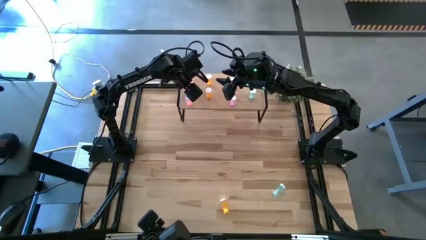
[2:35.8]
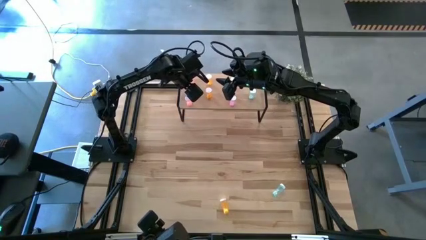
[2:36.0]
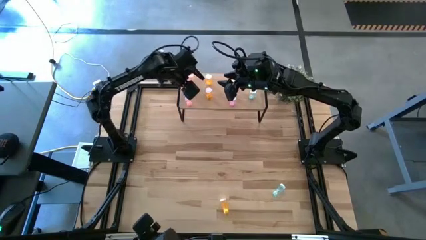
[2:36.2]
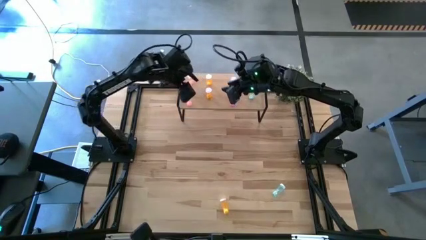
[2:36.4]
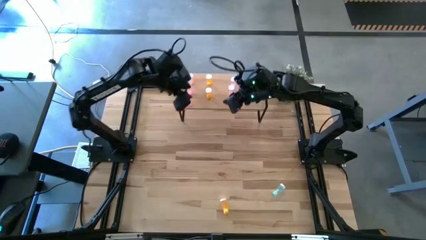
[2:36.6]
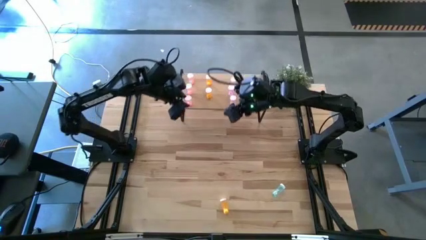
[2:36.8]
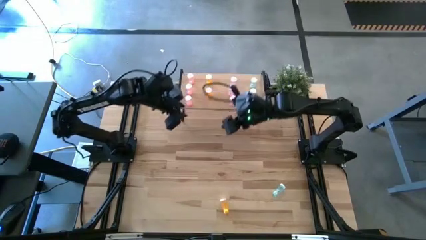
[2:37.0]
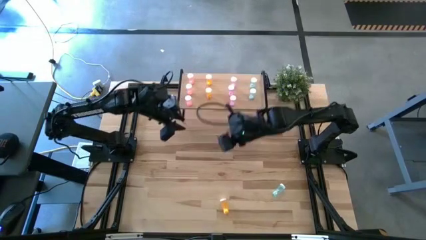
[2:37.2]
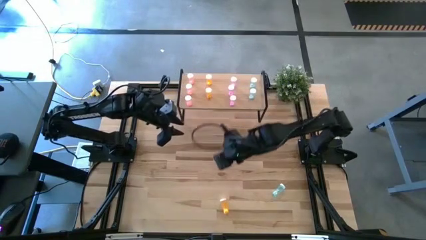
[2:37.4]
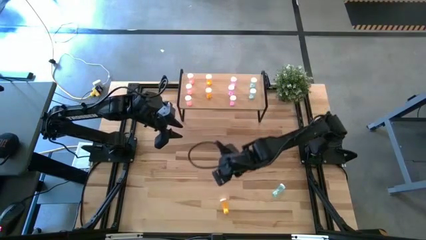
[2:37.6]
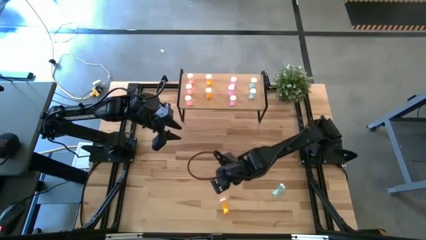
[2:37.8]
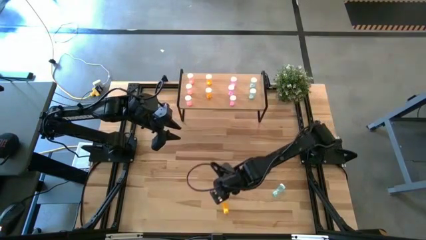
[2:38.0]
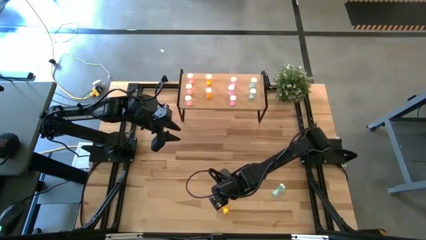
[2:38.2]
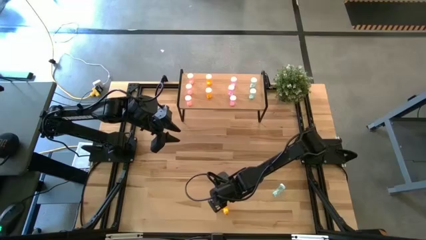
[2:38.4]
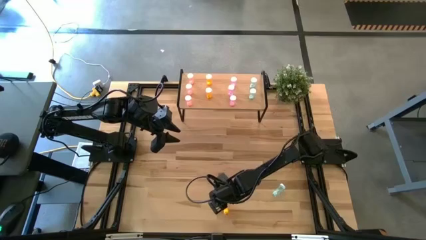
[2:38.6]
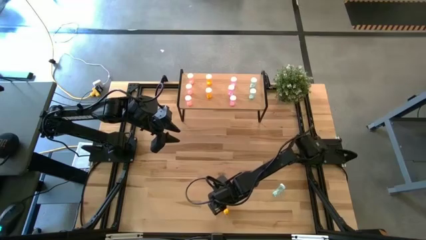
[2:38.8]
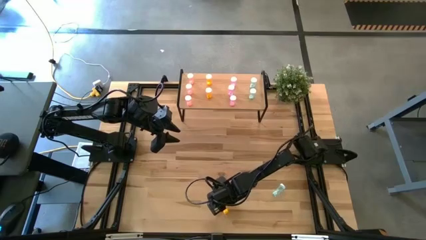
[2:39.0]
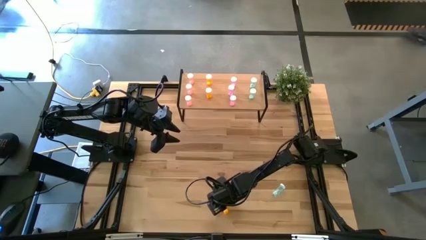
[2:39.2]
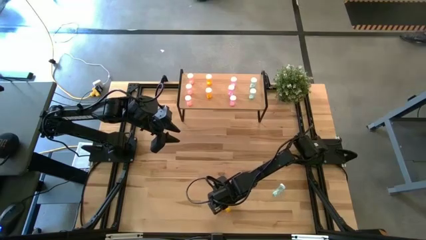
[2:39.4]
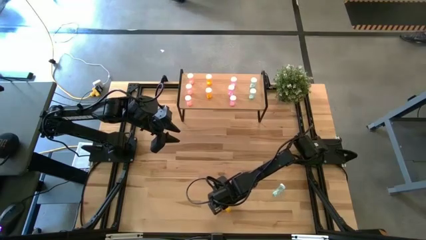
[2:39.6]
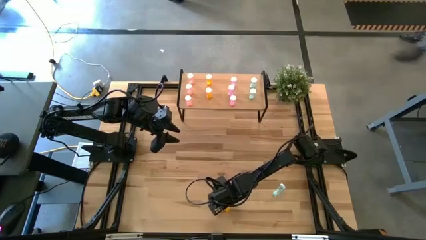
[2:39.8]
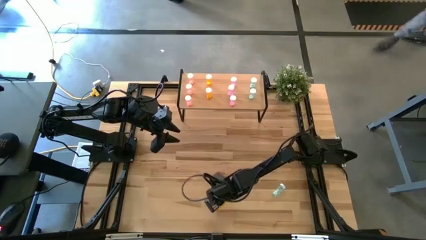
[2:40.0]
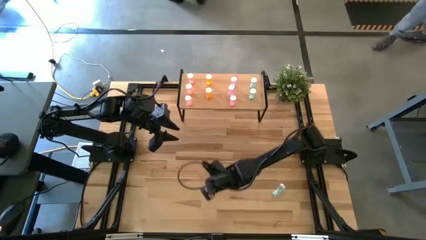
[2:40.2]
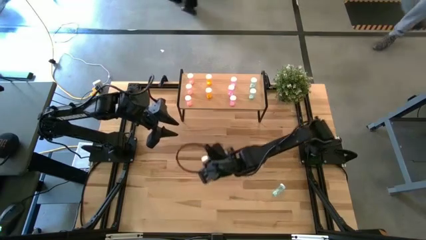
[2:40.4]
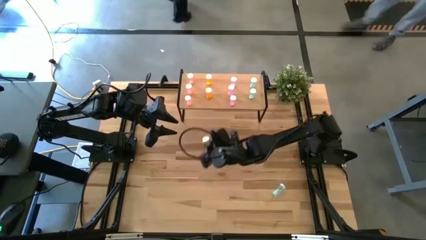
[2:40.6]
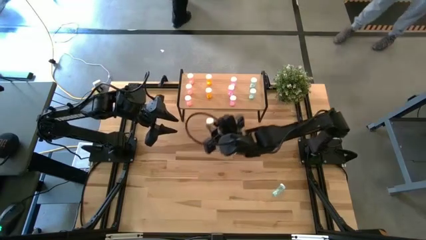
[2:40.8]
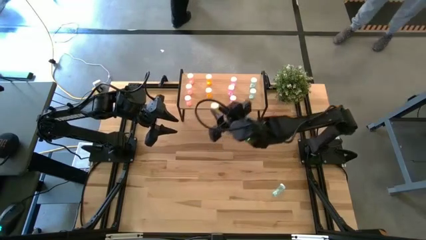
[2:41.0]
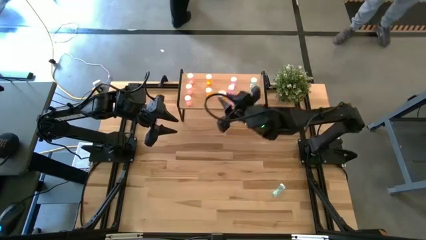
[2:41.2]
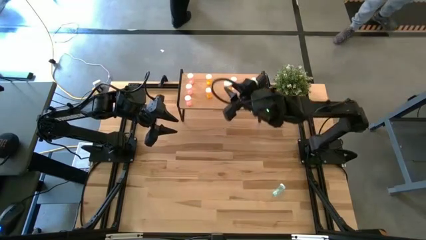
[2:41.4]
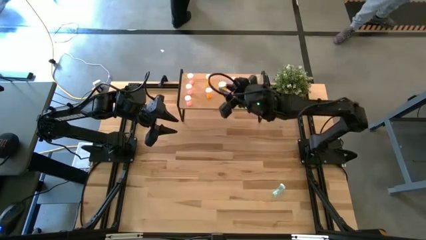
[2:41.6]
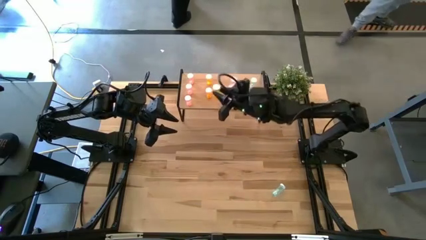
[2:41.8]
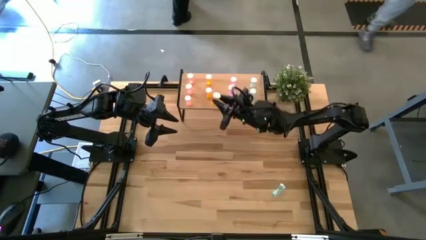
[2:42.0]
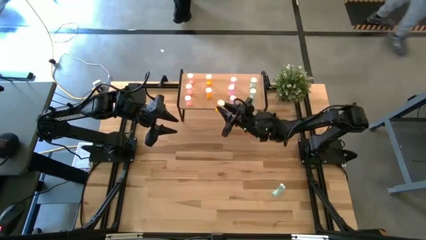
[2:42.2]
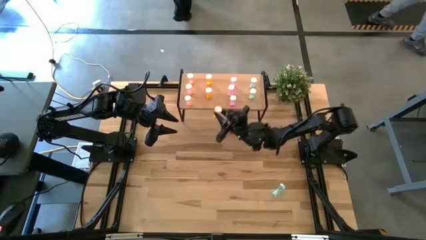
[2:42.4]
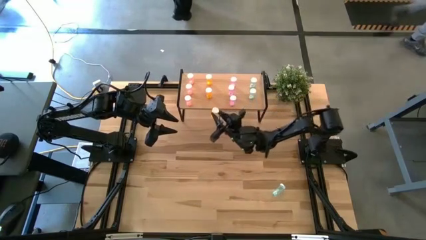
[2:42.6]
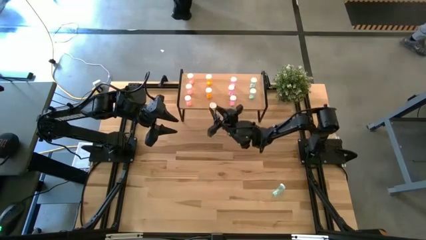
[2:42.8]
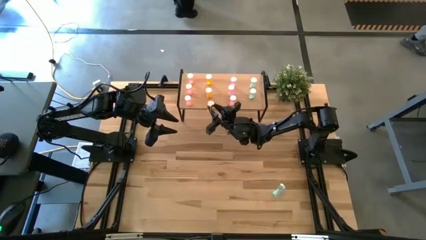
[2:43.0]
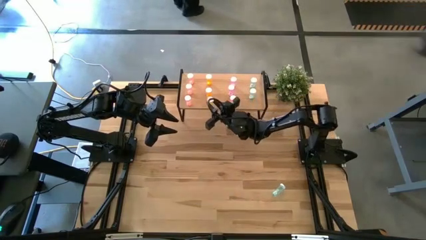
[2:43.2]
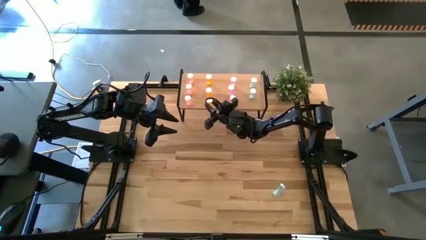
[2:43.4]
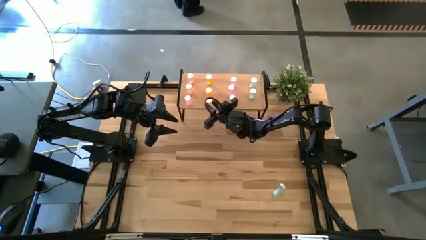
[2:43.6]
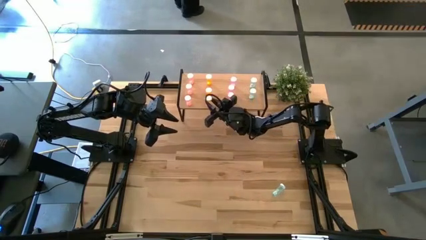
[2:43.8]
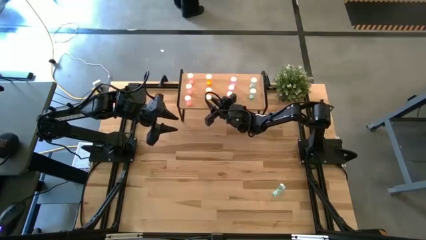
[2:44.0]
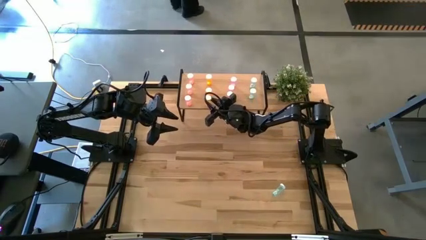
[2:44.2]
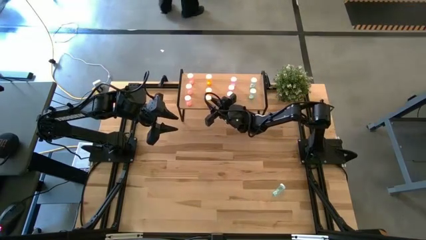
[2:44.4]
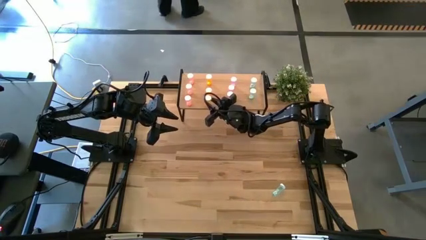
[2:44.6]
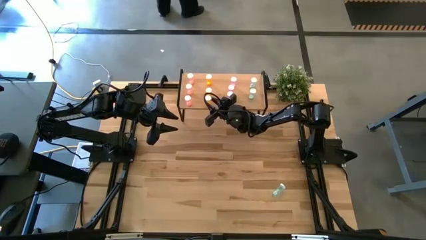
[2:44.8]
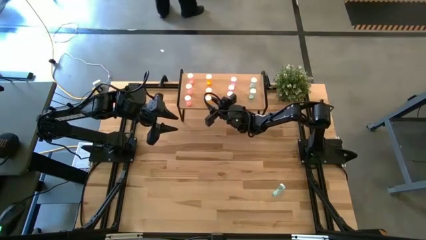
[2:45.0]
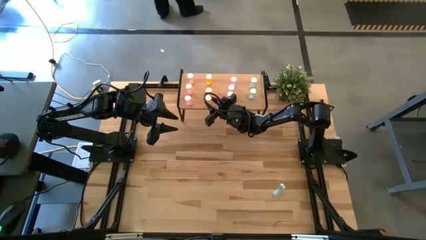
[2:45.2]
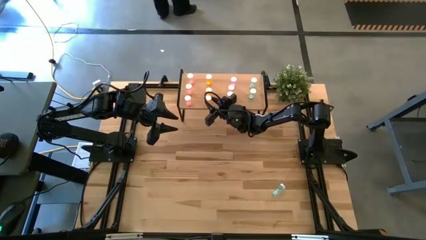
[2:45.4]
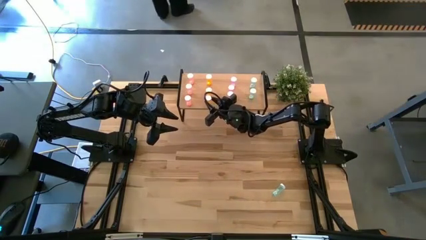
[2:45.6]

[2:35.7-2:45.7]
Task: Pick and place medicine bottles onto shelf by color
Put the orange pill bottle on the shelf aligned with the other orange pill bottles

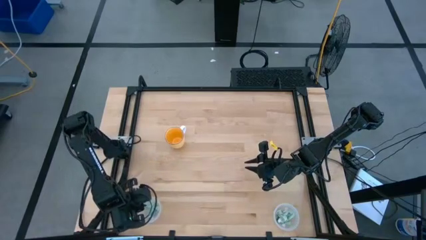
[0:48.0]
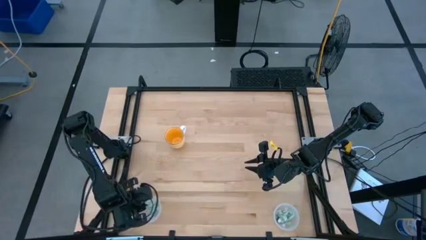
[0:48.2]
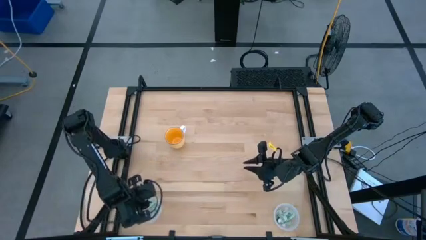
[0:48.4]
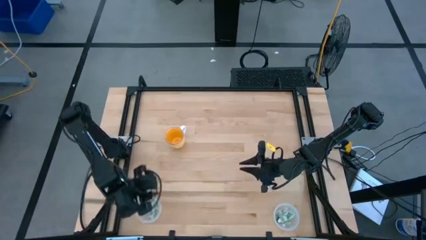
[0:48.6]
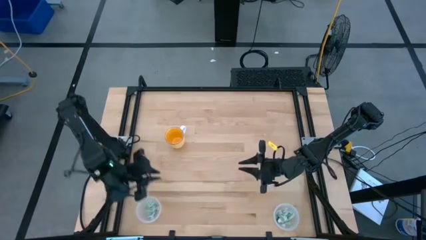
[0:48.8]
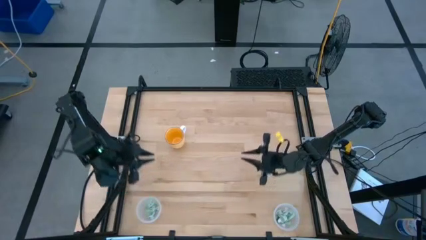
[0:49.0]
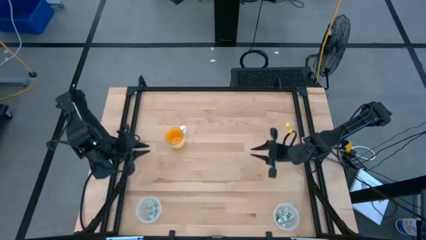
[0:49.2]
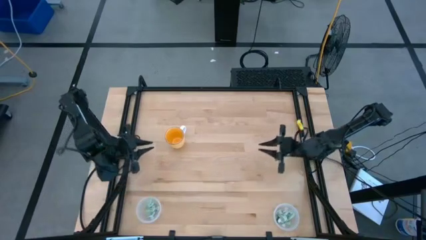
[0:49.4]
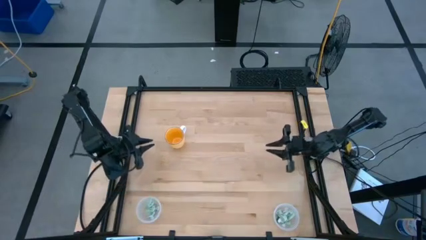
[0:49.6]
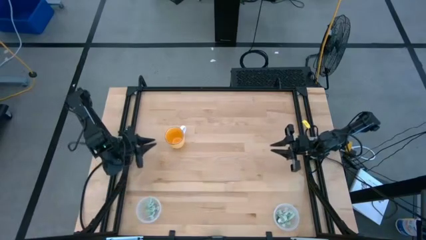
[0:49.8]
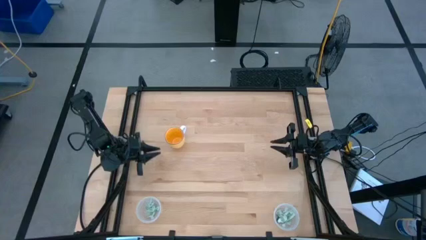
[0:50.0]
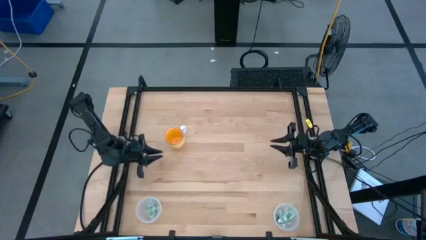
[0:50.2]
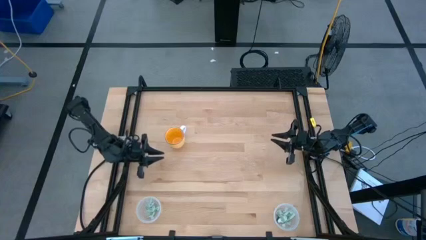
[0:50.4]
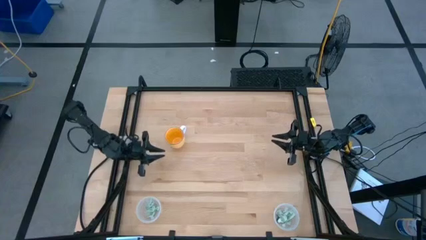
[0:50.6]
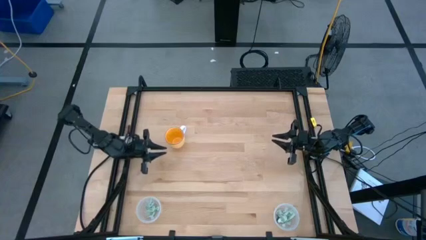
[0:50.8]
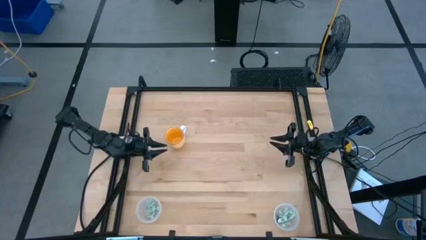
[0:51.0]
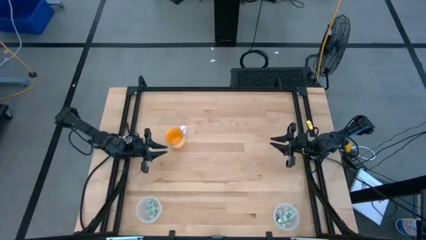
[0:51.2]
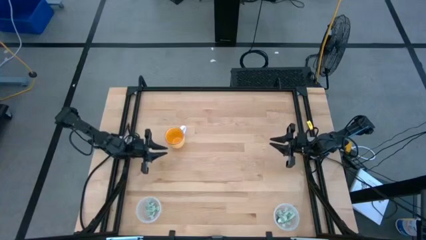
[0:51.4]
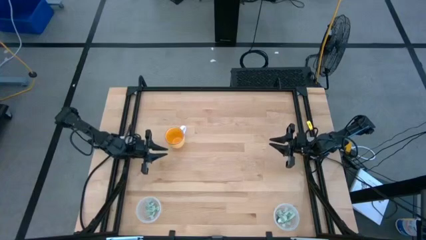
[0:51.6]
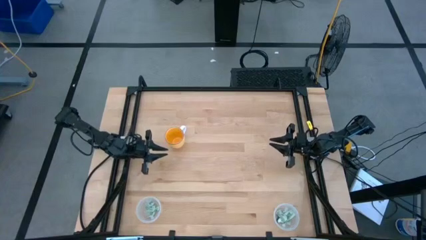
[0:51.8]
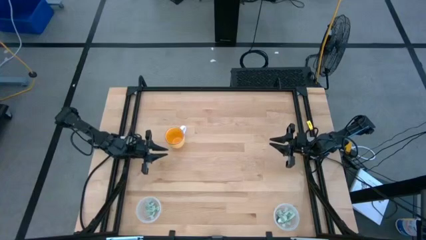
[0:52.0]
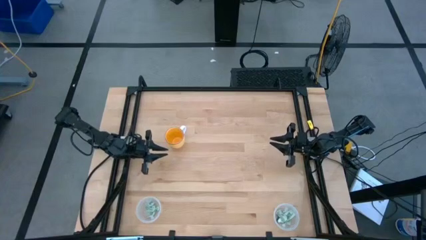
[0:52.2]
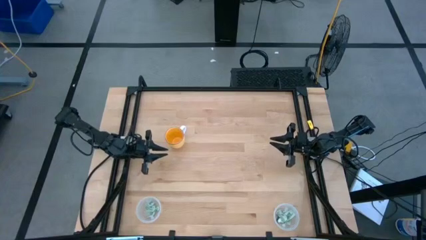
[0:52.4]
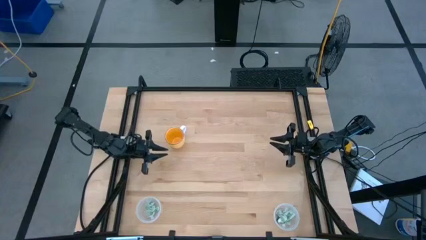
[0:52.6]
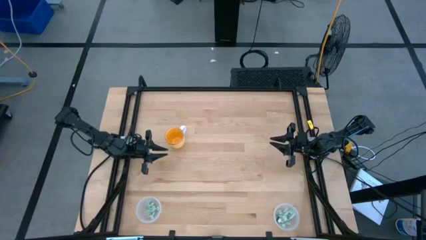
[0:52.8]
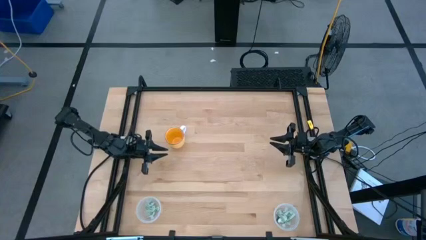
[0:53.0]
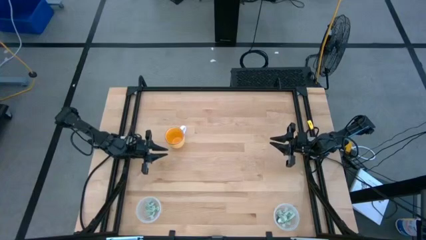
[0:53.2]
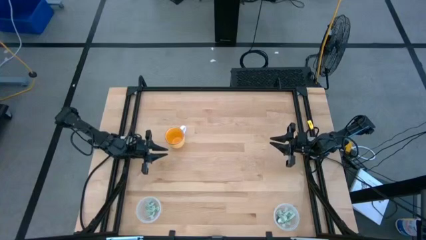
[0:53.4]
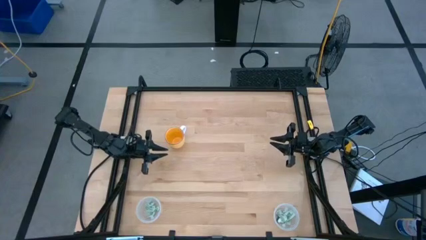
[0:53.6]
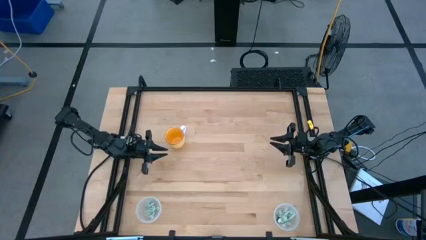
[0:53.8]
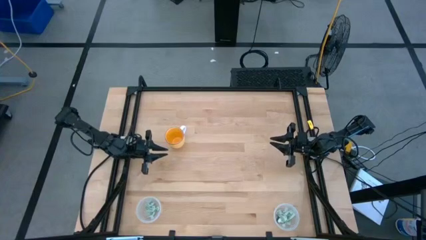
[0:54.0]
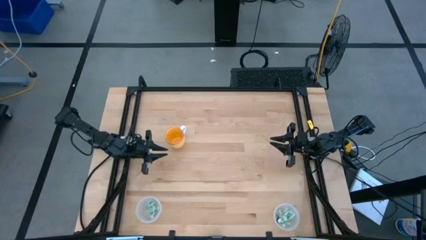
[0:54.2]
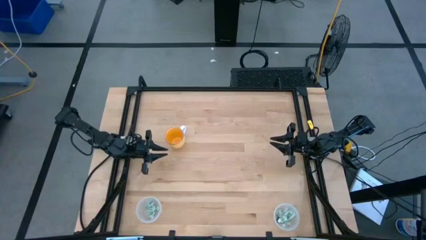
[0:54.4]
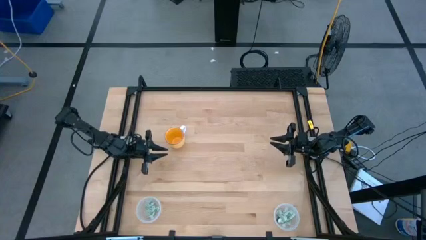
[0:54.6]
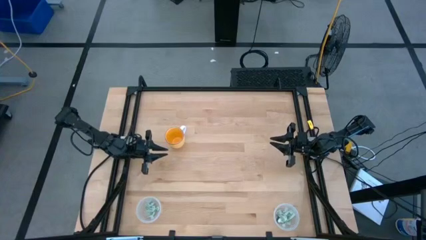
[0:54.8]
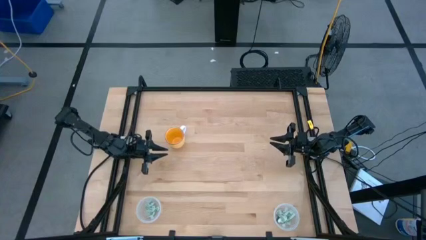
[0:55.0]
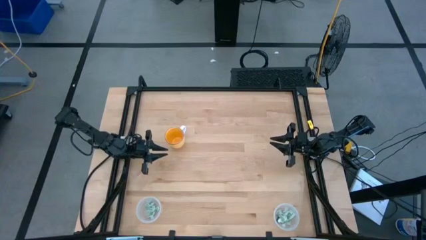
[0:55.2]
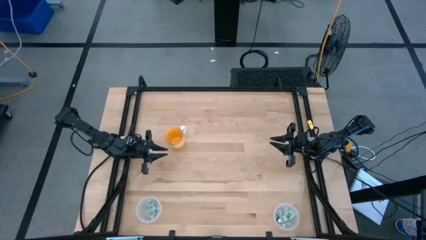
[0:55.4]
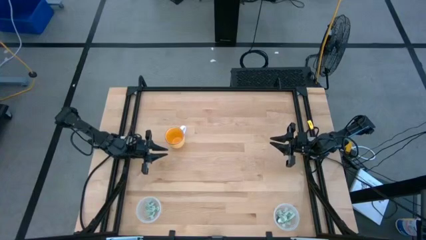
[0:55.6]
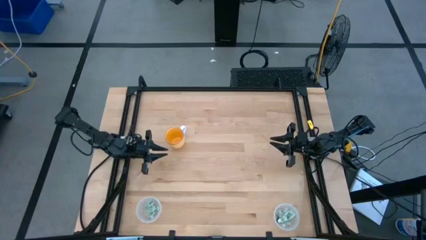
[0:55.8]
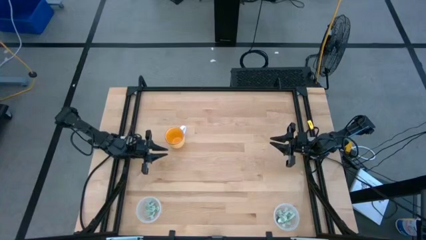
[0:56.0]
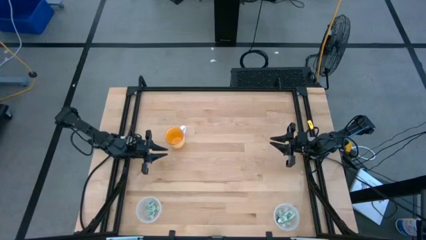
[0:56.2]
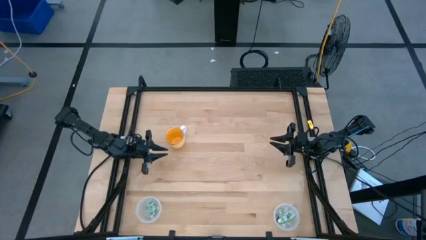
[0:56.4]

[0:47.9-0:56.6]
Task: Pick and place items into bin
Return to home position
